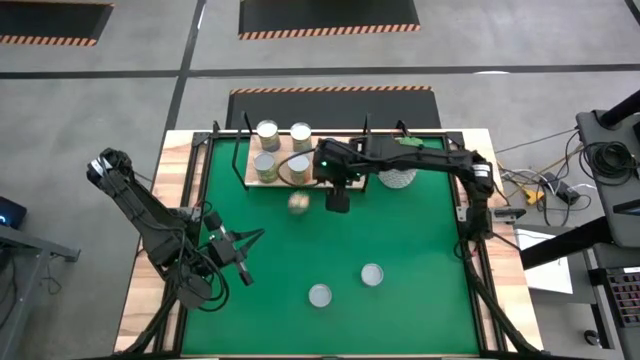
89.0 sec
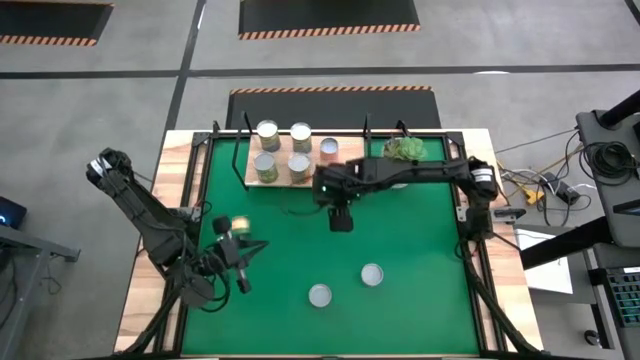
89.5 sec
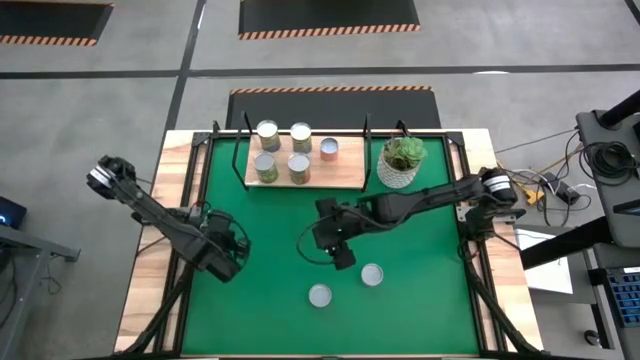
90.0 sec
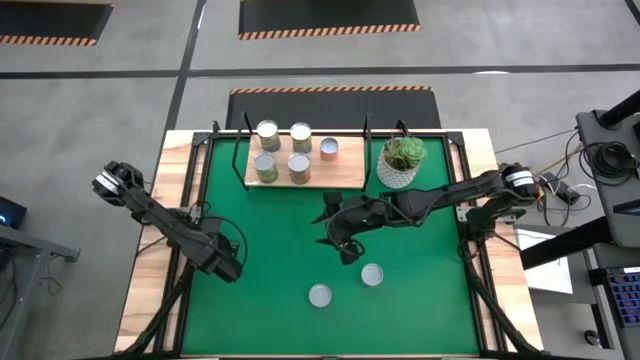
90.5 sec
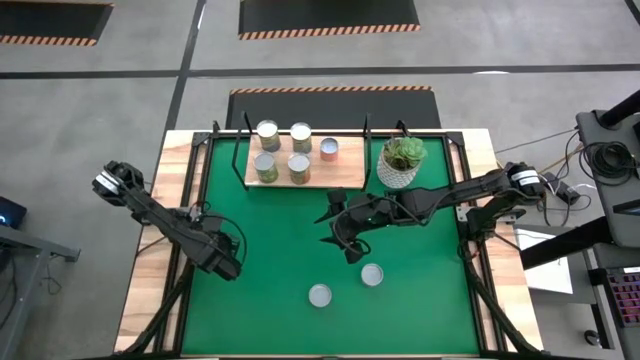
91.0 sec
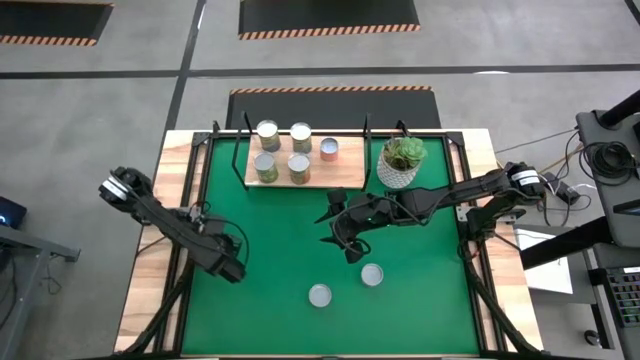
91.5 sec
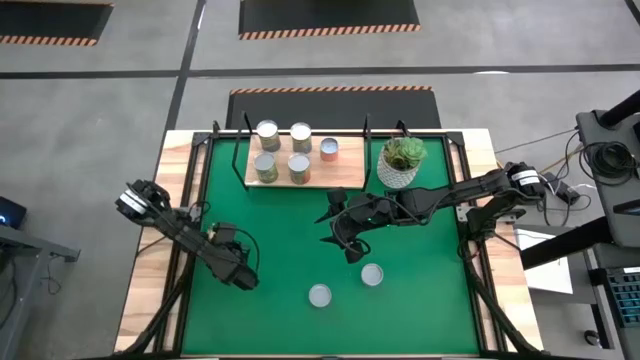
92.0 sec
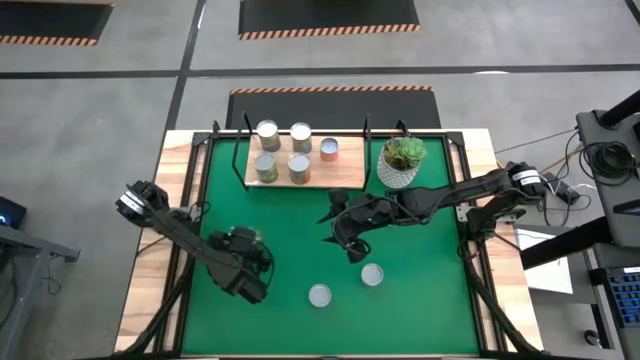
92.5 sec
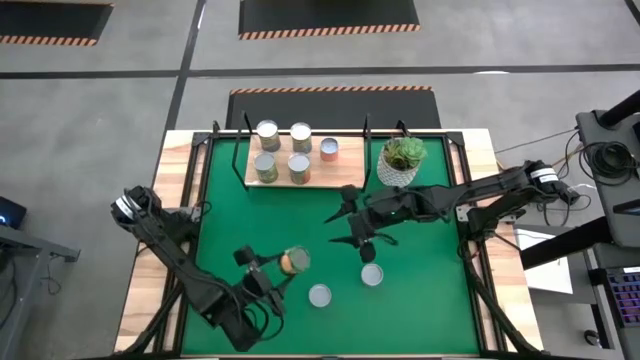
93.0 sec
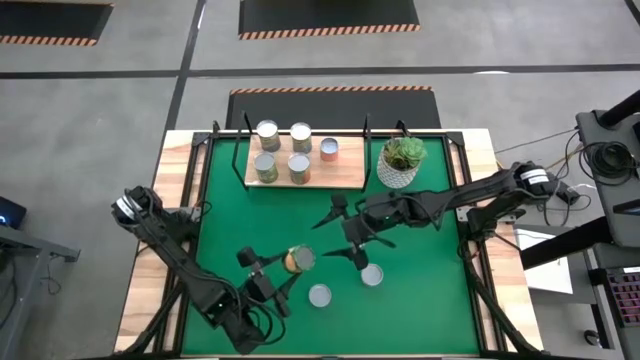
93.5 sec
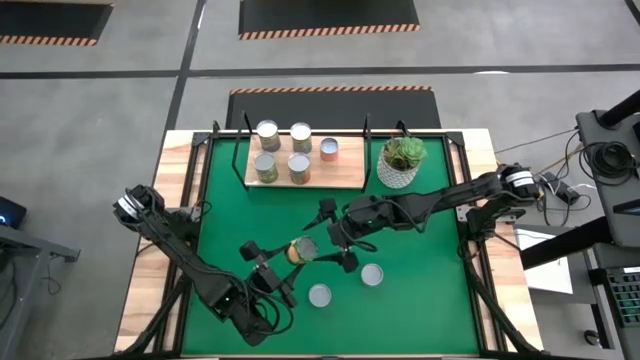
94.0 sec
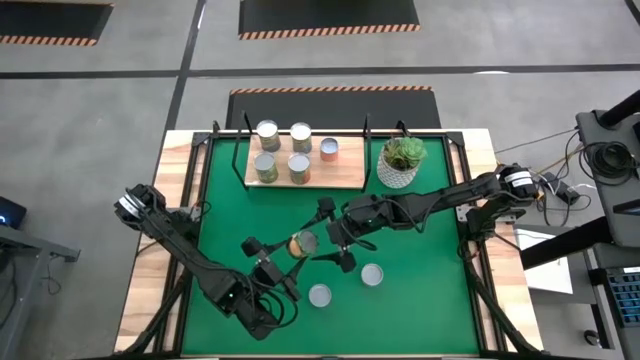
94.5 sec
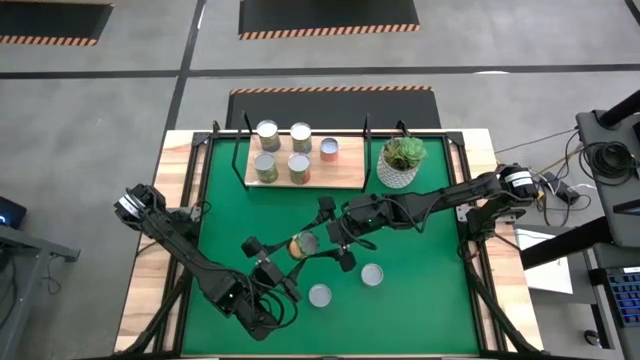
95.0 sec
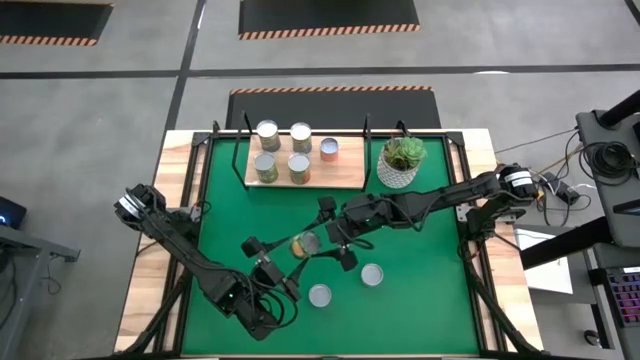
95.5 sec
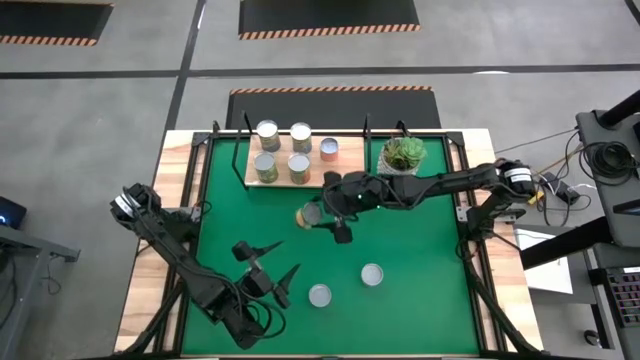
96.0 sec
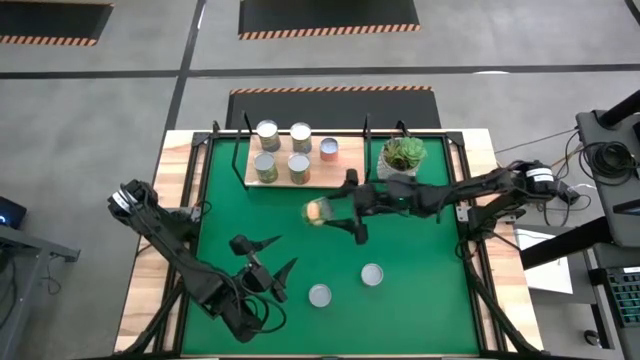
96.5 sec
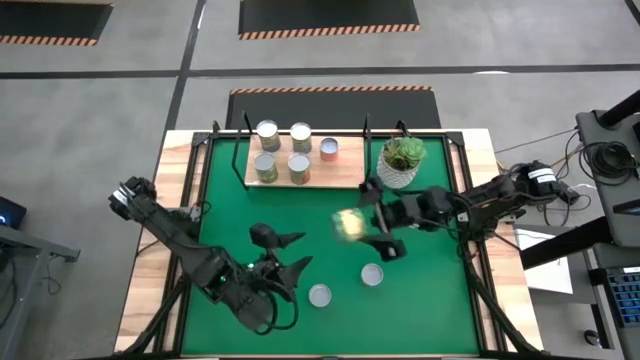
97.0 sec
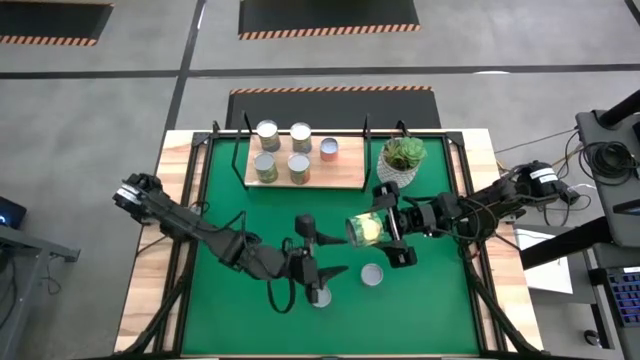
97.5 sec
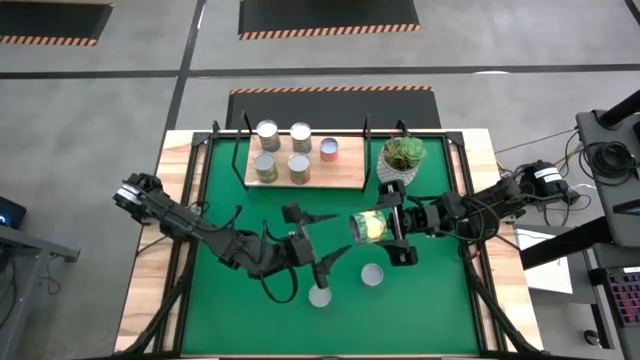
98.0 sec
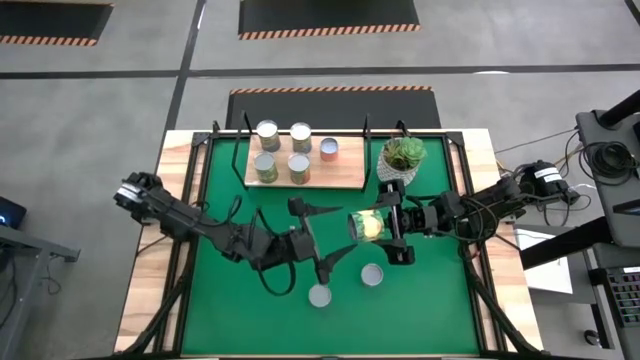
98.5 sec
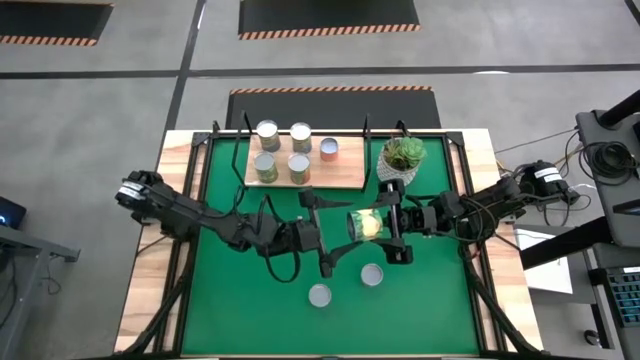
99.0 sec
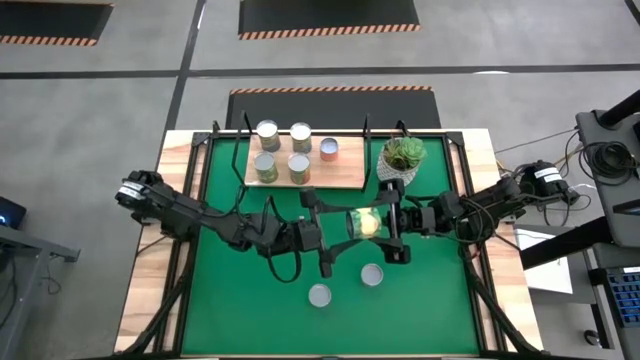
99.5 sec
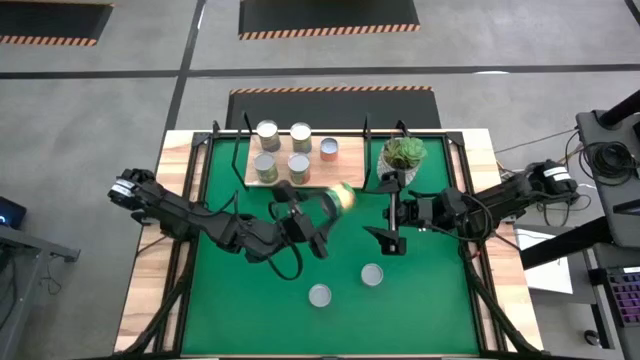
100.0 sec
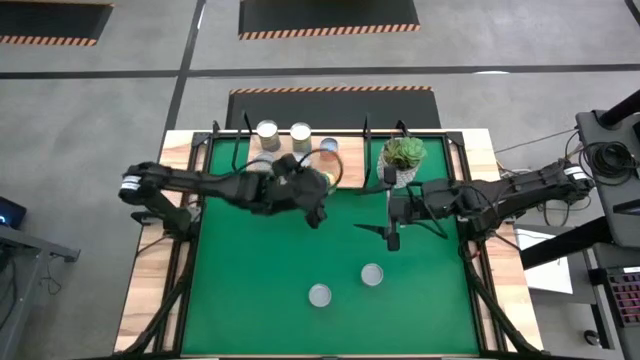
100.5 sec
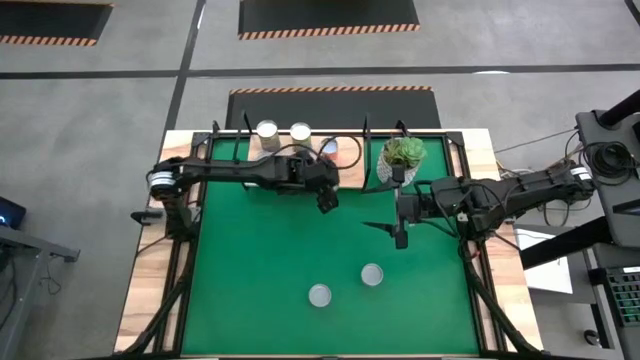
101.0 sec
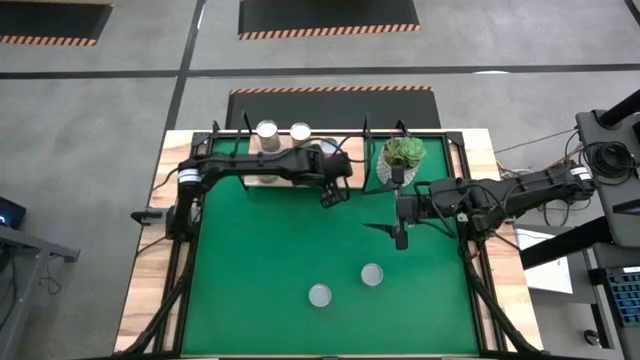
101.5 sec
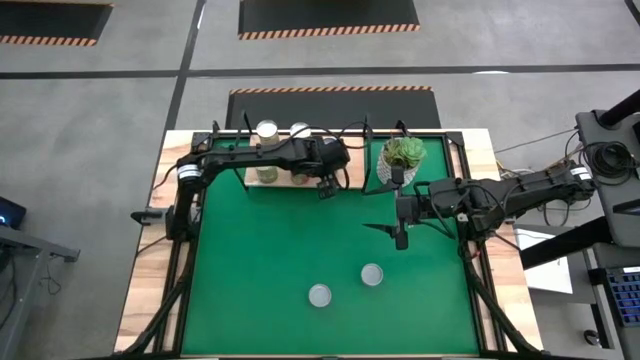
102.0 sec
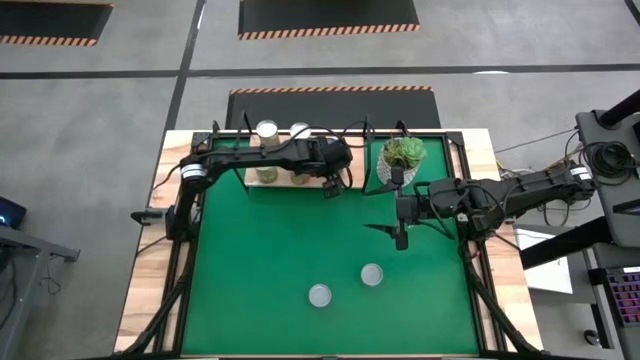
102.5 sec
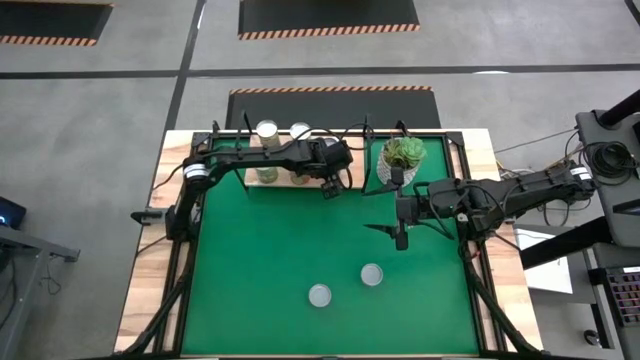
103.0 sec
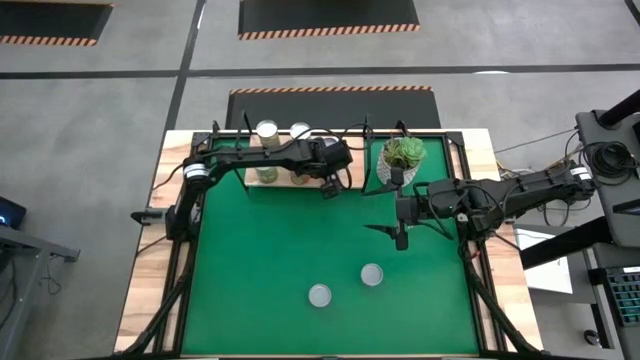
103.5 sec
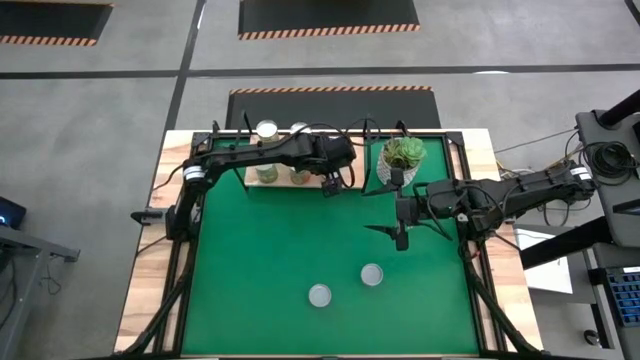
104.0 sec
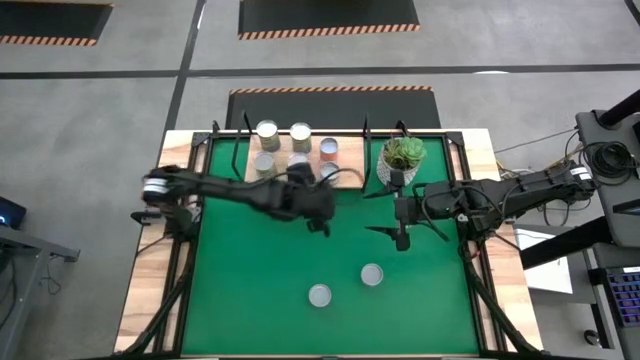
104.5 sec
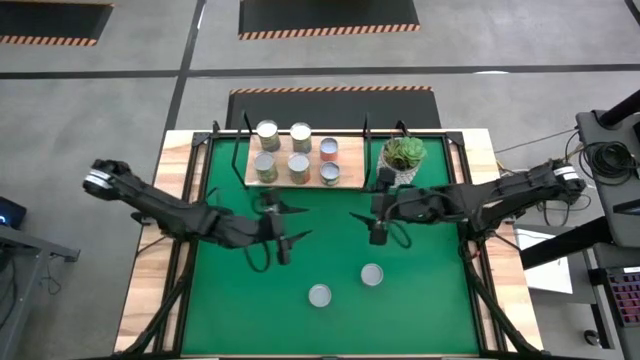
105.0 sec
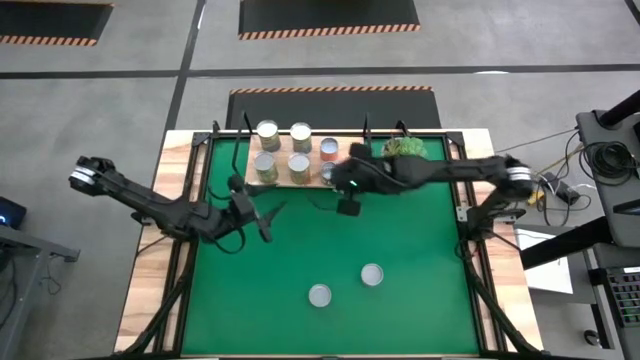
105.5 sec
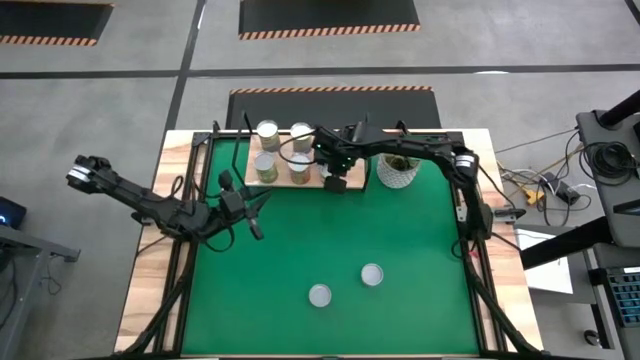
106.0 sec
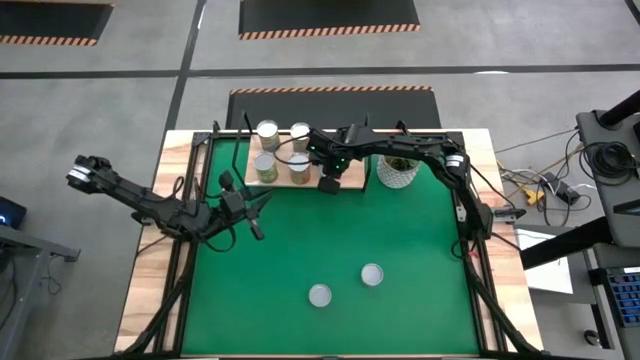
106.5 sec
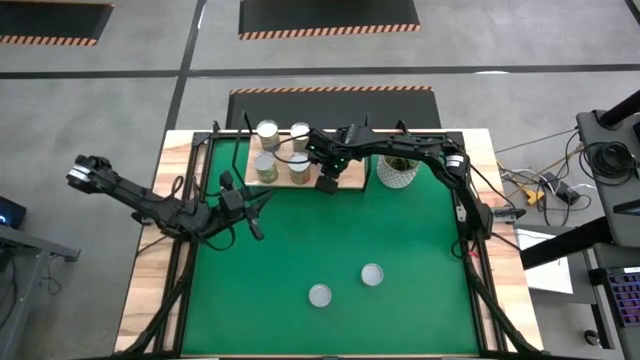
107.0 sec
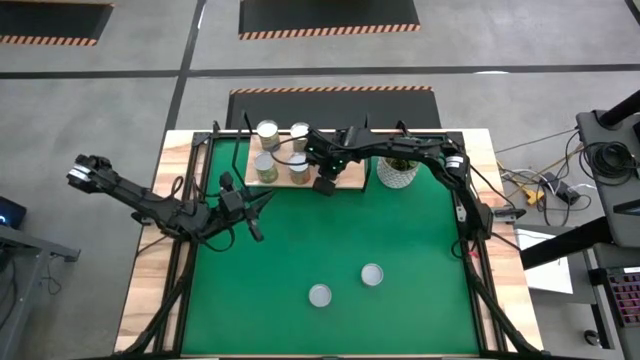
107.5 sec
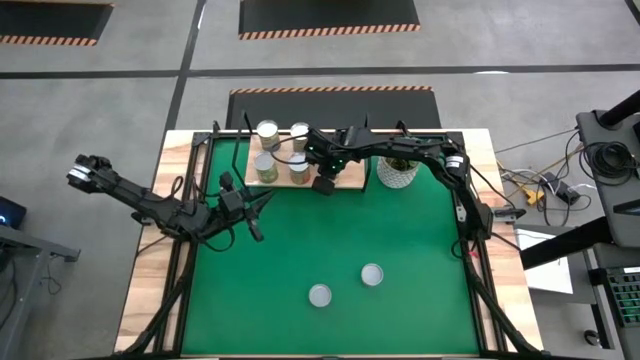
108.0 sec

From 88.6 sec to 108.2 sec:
Task: Pick and place cans onto a shelf
Put the canned peach on the shelf

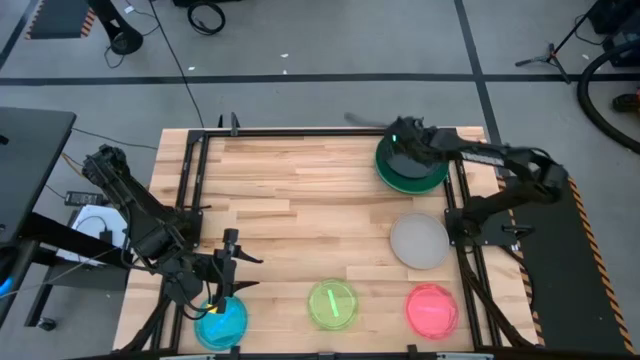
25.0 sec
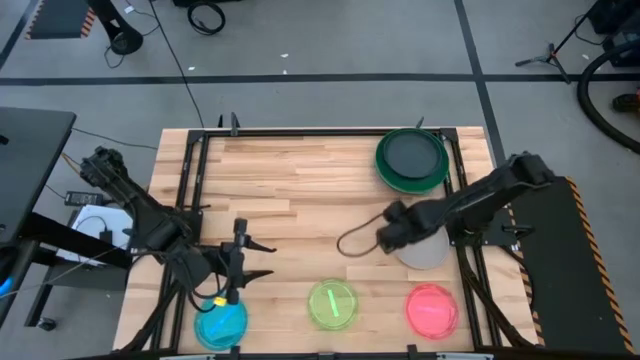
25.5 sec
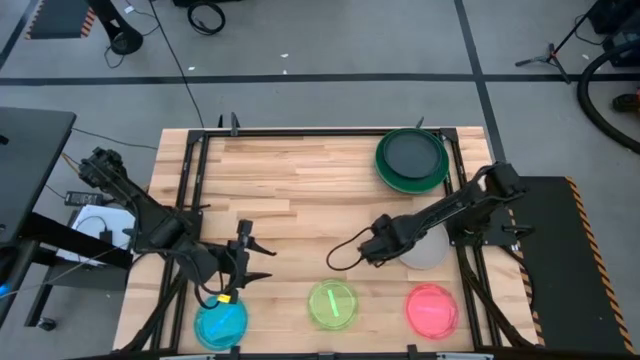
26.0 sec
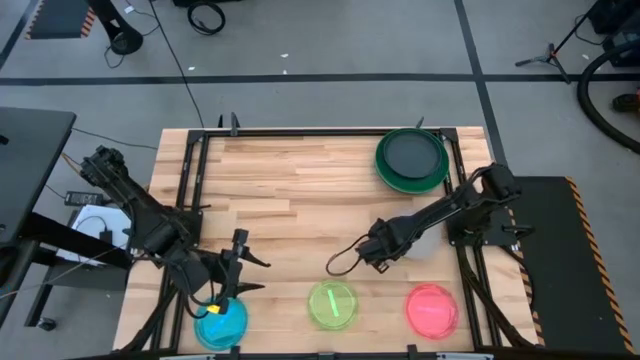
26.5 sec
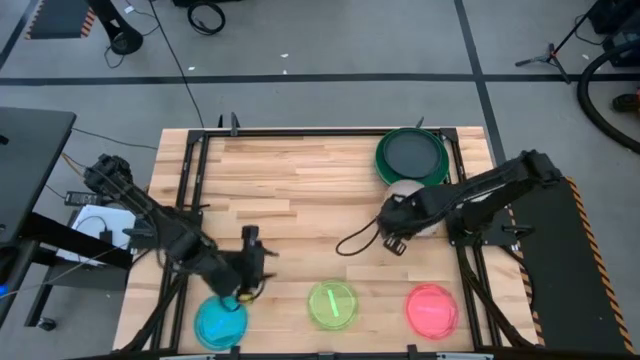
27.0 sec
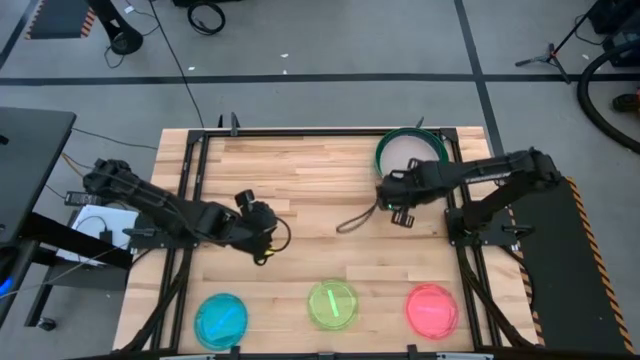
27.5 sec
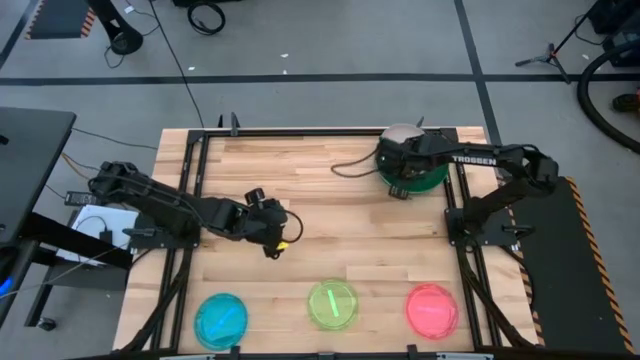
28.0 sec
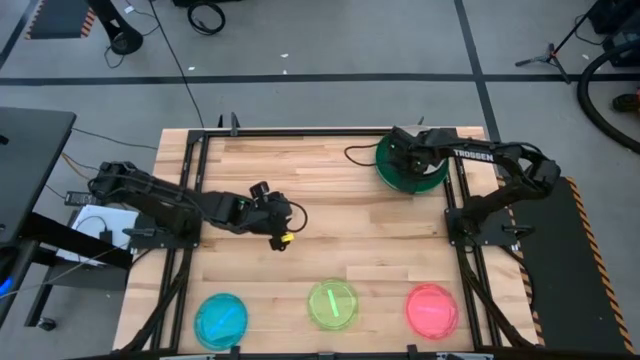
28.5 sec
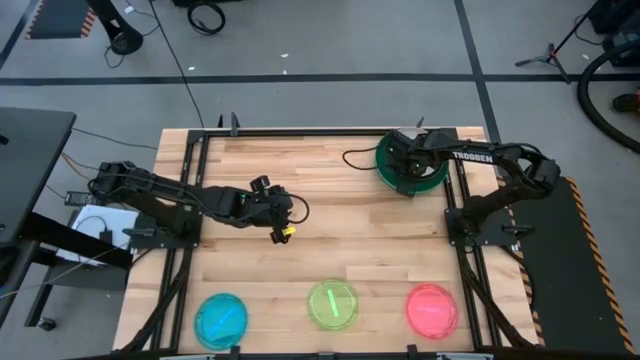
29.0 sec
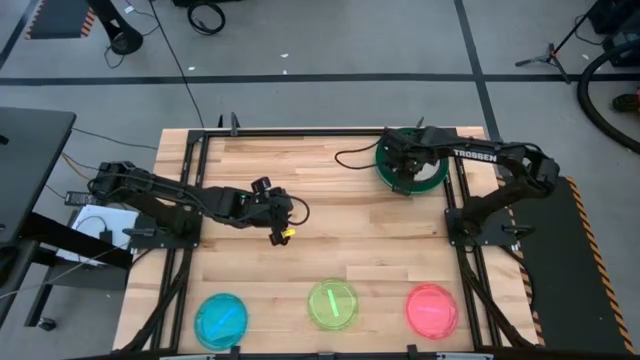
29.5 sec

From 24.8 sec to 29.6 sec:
Task: Stack plastic plates
Stack the white plate on top of the black plate
